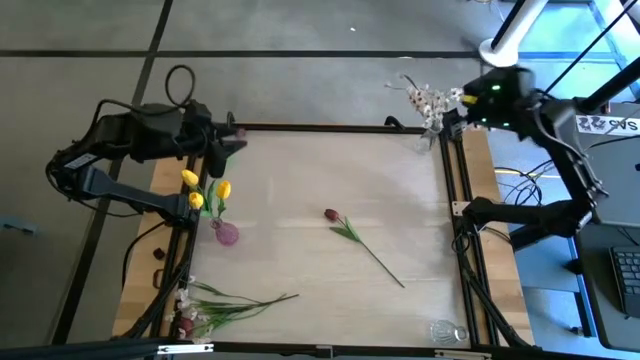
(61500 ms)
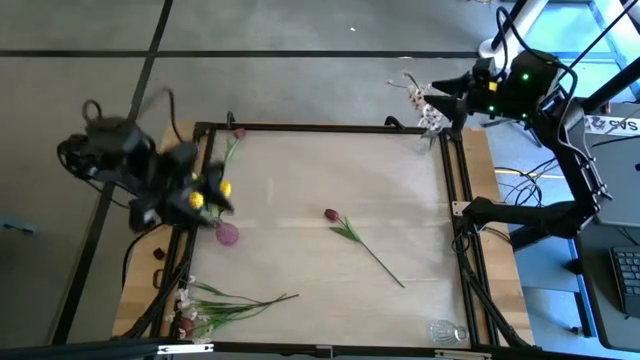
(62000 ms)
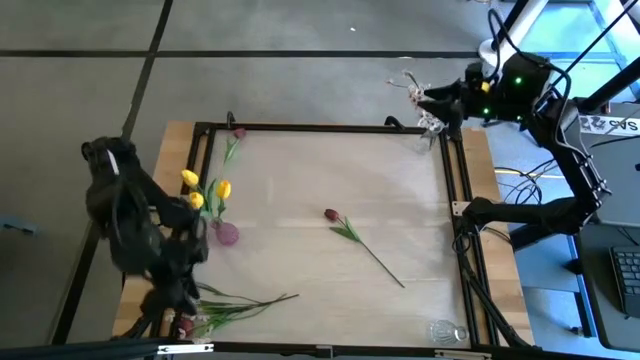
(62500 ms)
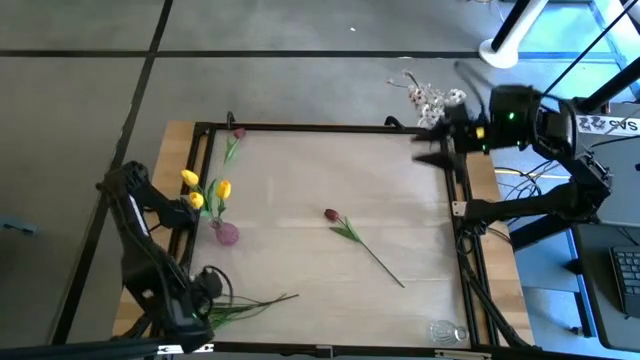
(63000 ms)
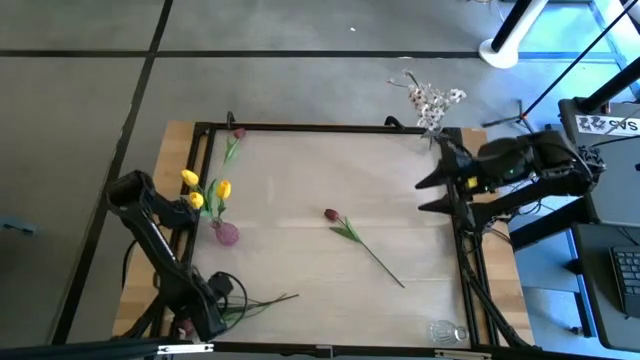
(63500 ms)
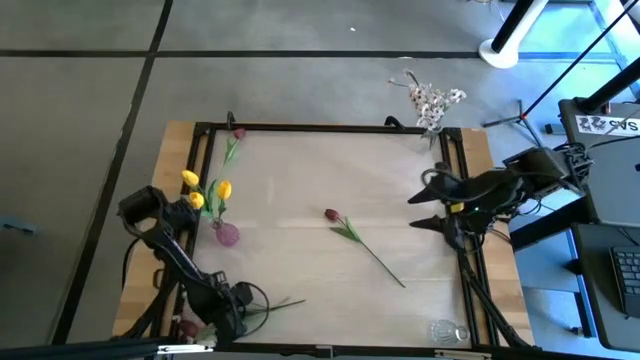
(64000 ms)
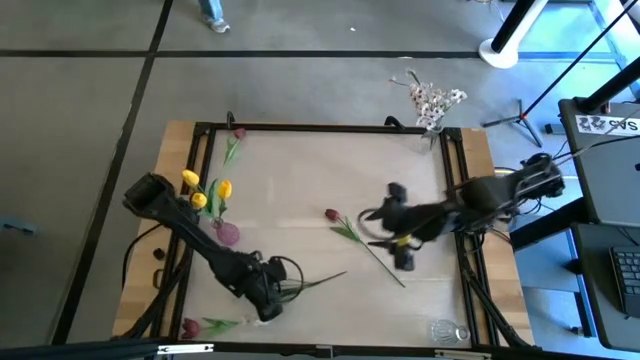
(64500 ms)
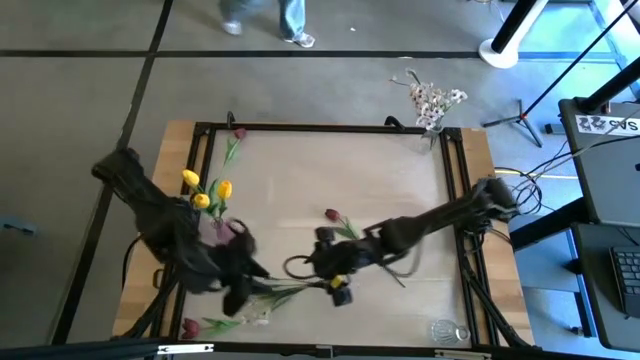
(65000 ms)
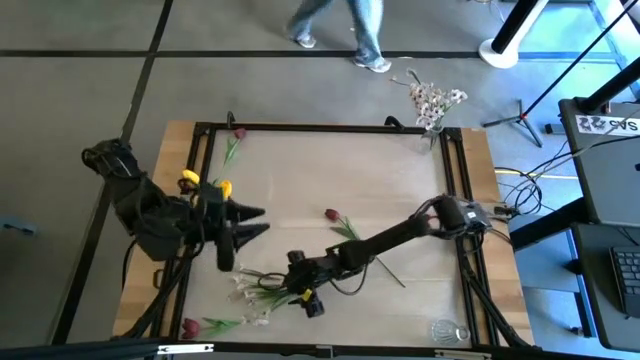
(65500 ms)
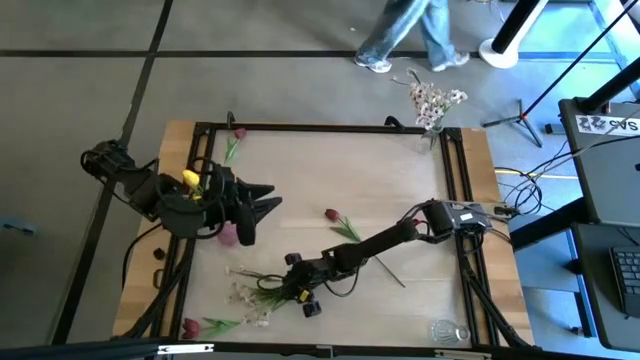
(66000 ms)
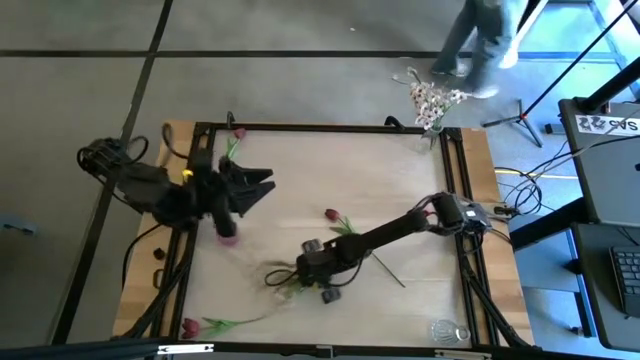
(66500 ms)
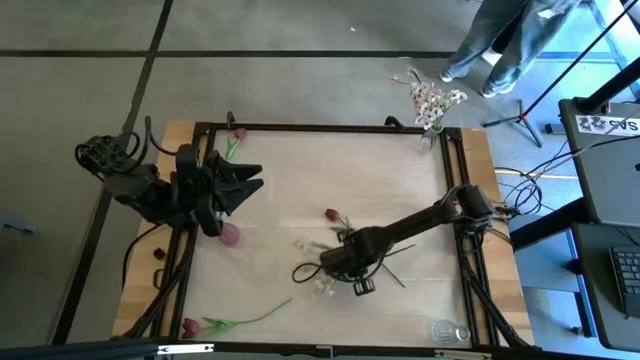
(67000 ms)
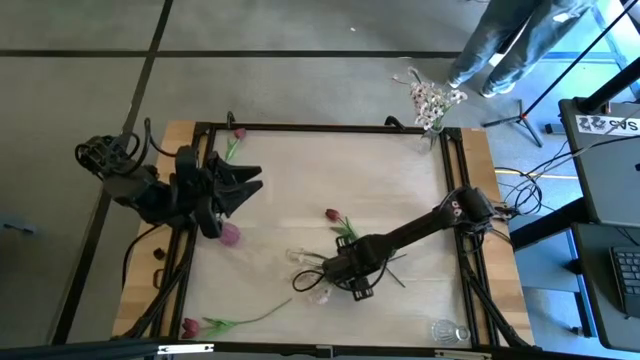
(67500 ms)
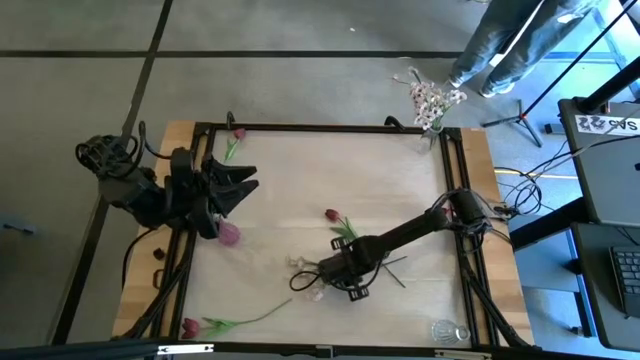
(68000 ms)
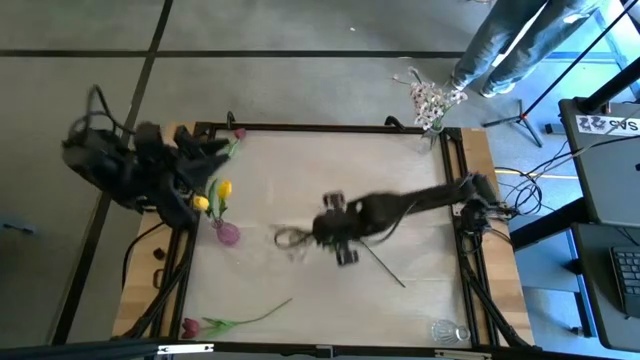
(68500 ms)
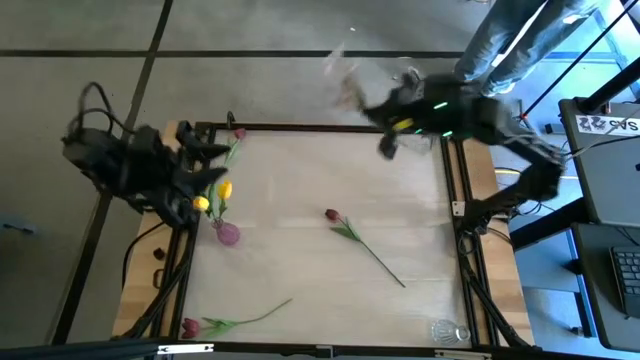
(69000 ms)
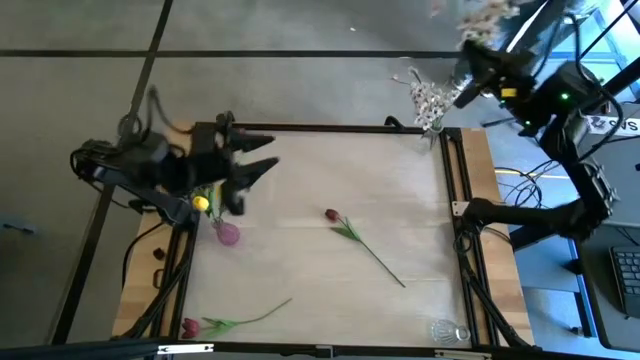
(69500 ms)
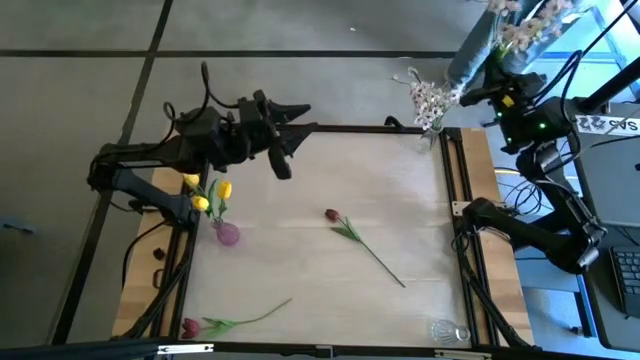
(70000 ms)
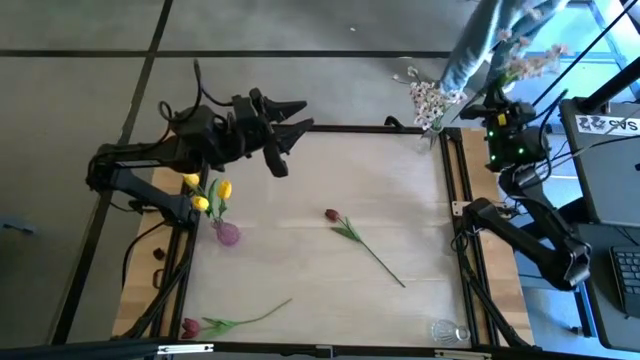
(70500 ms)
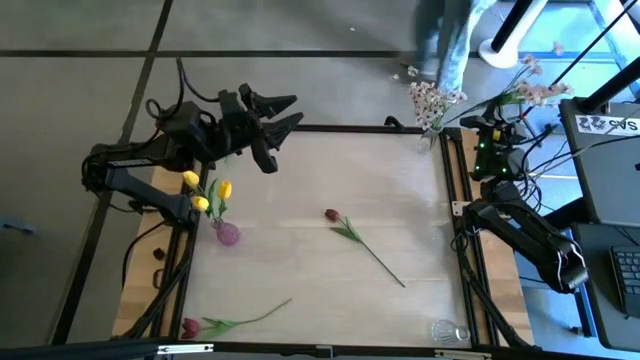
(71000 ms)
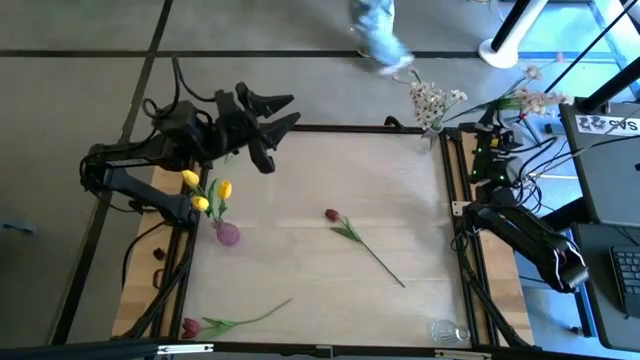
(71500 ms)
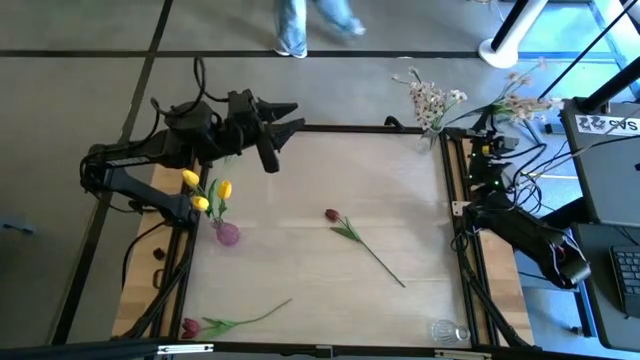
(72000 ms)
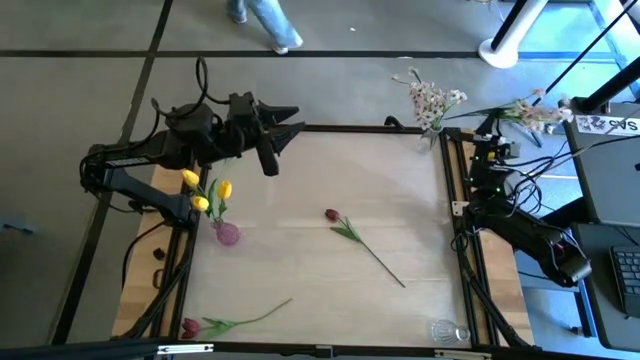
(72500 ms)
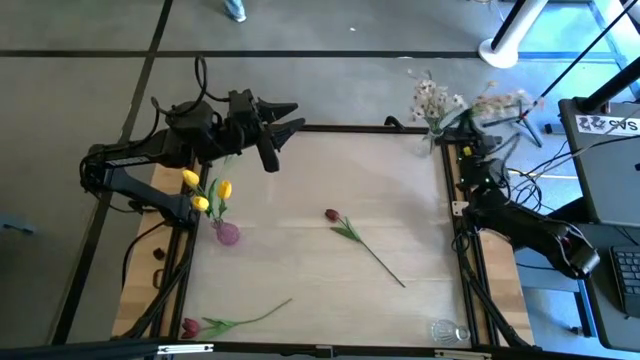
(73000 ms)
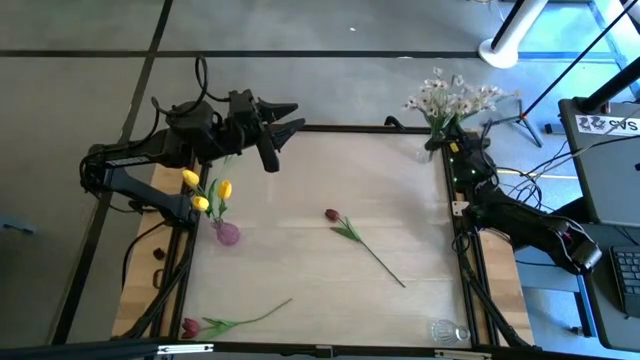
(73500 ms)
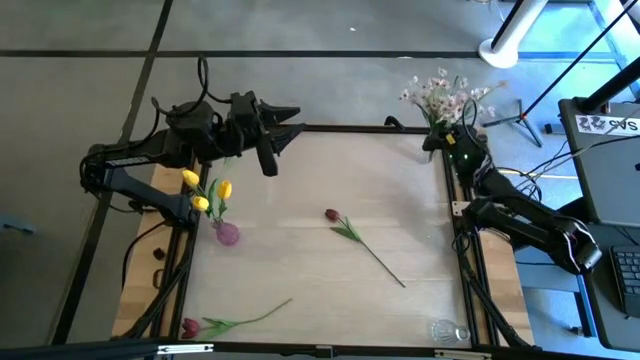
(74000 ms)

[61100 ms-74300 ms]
Task: Sort flowers into vase by color
Put the white flowers into the top transparent flower vase

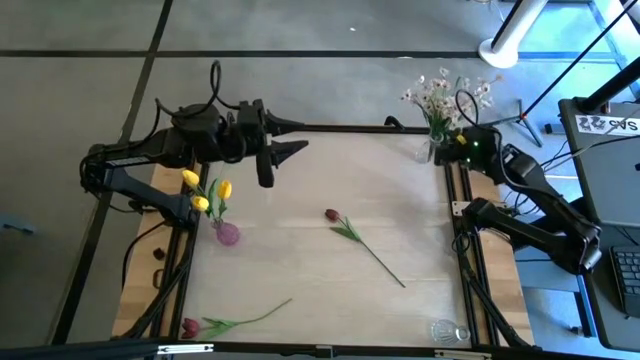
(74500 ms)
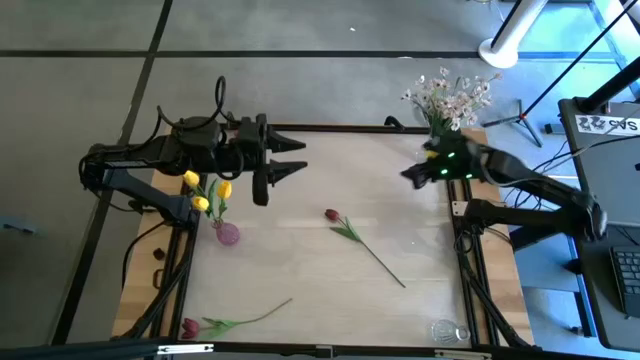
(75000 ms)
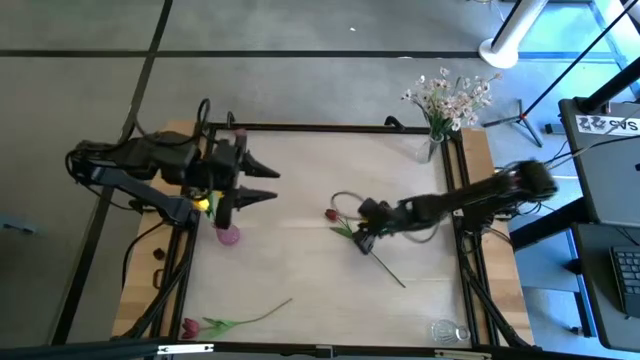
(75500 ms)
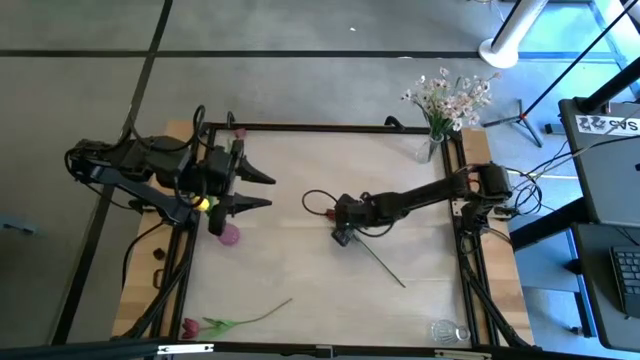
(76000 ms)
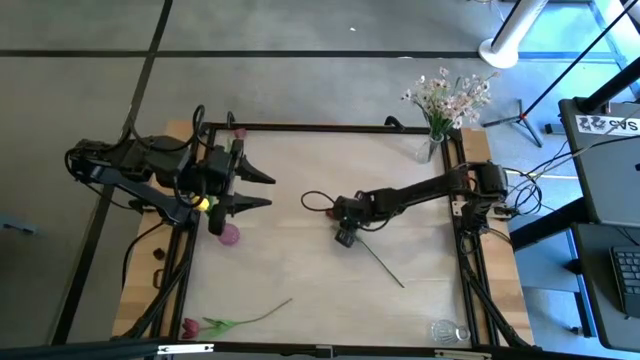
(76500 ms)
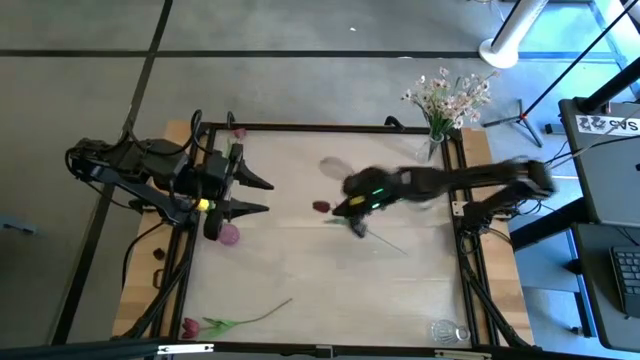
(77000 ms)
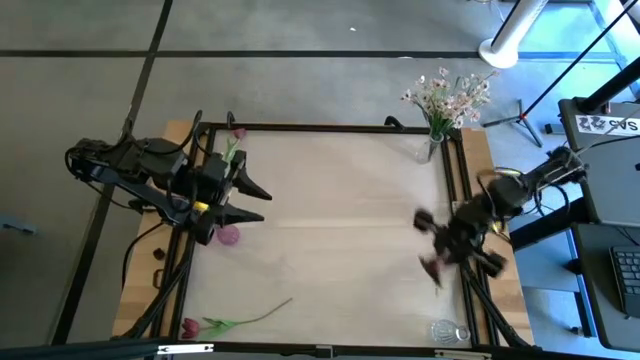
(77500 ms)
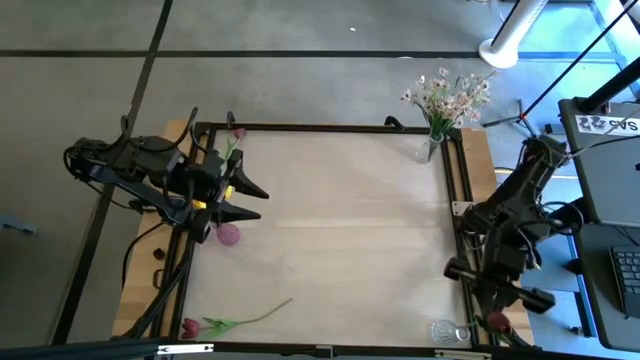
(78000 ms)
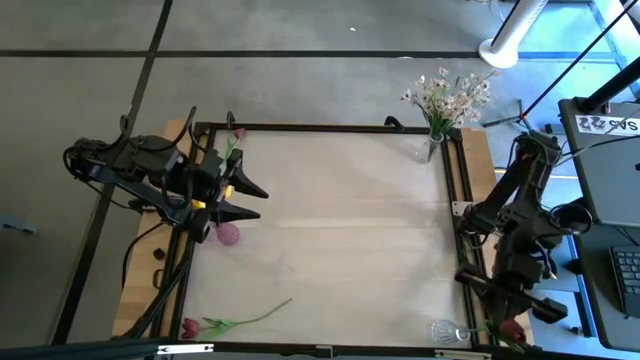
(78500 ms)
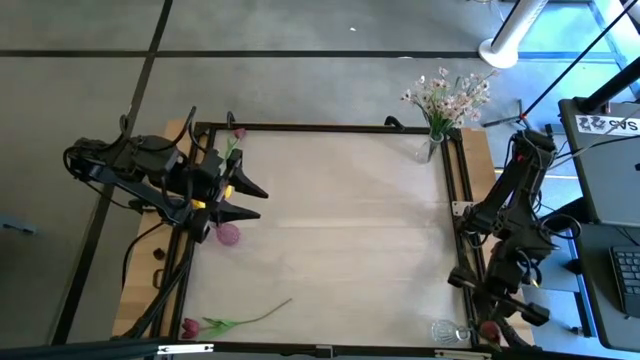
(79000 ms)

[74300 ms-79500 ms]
Put the middle red tulip into the bottom transparent flower vase

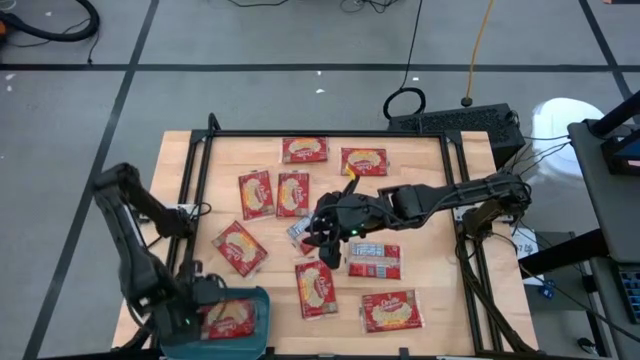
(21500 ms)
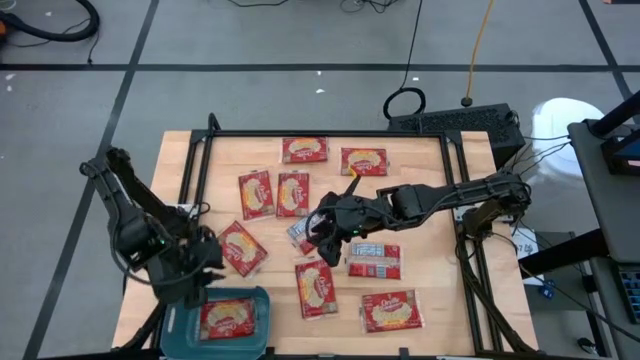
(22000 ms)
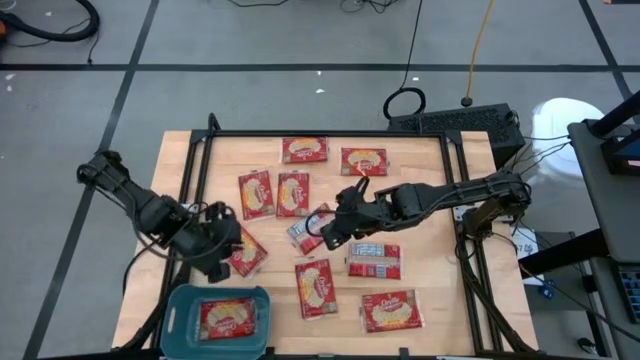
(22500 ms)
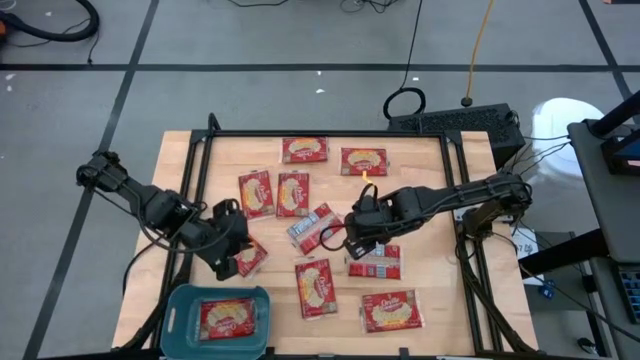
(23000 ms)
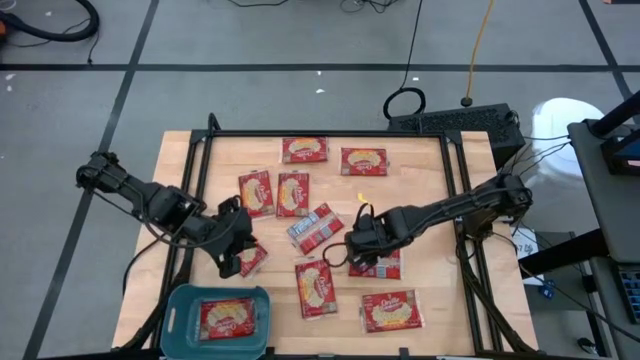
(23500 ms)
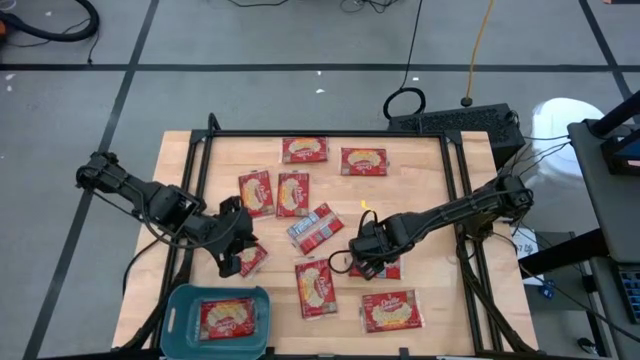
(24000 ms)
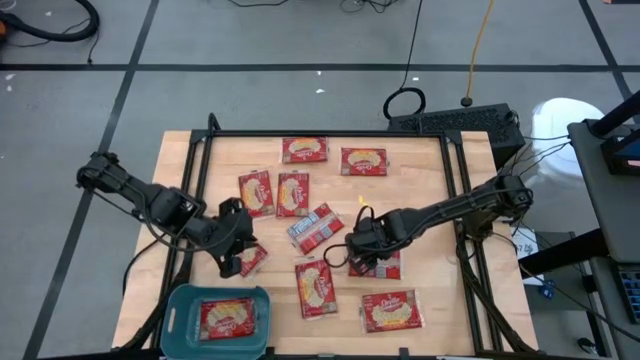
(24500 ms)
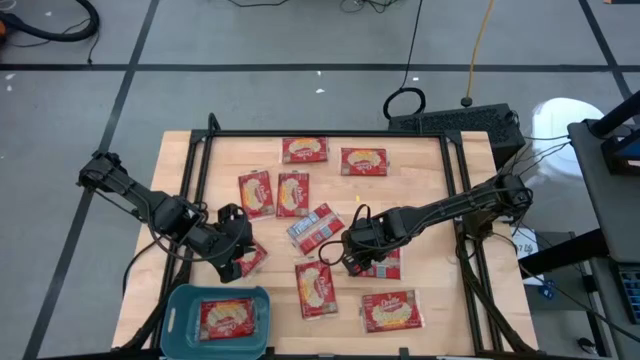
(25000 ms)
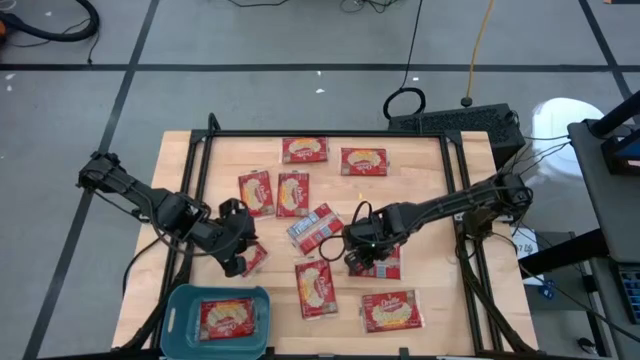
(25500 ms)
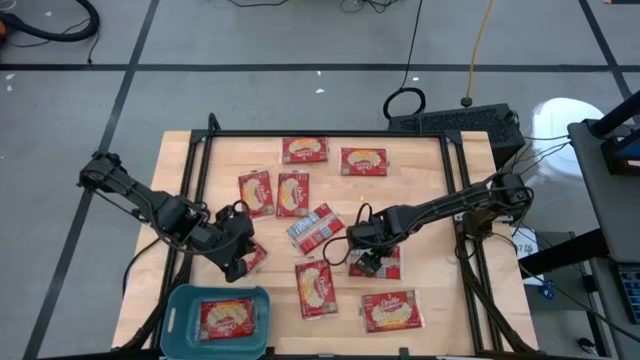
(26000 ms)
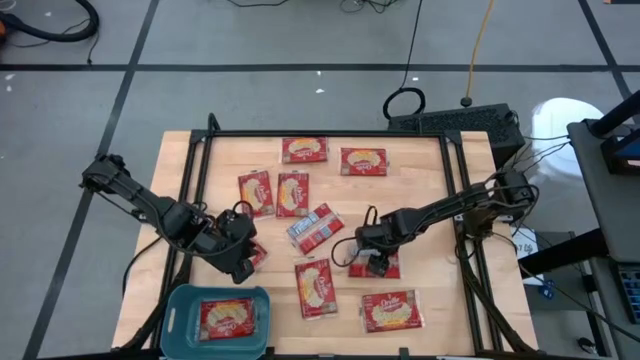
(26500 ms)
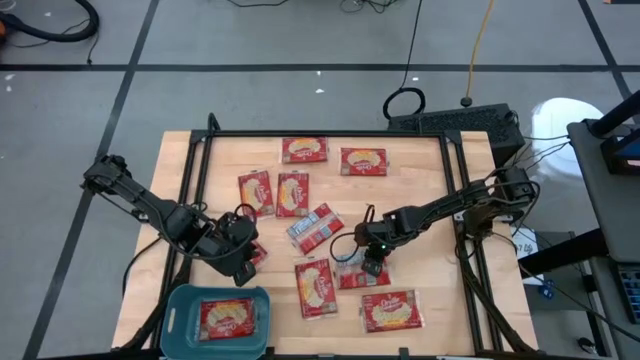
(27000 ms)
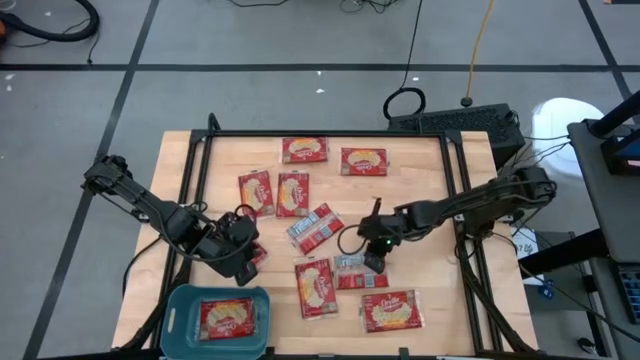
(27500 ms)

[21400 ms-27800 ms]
Task: Sort popcorn bags into baskets
Put the popcorn sachet into the bin
